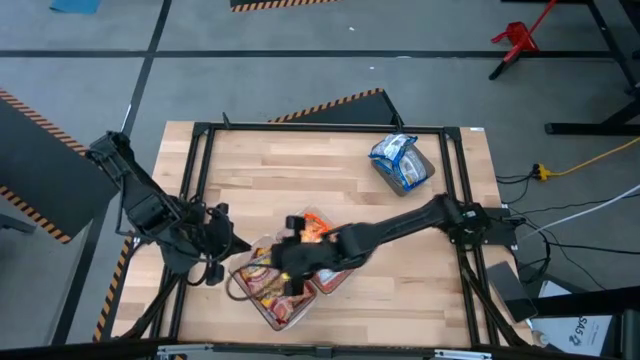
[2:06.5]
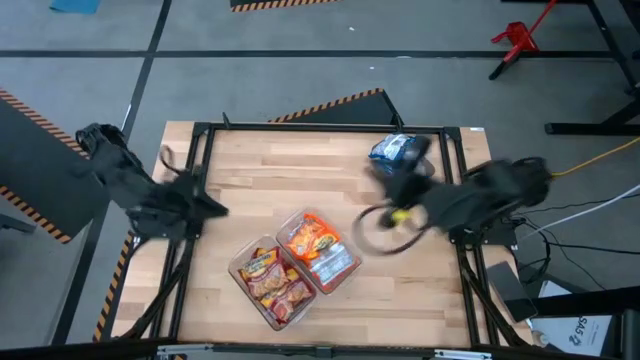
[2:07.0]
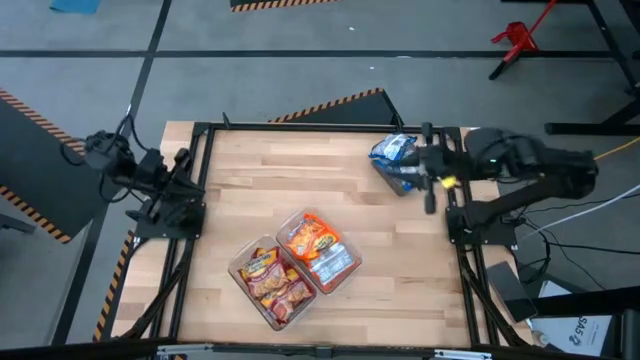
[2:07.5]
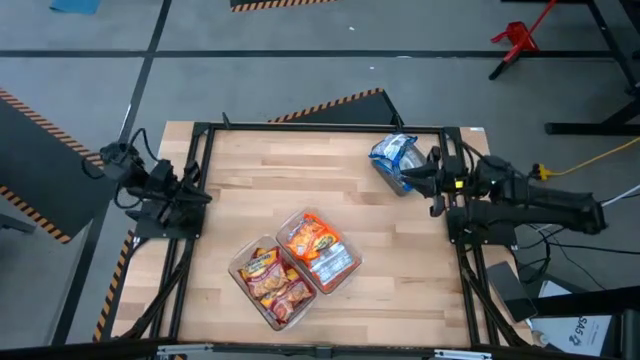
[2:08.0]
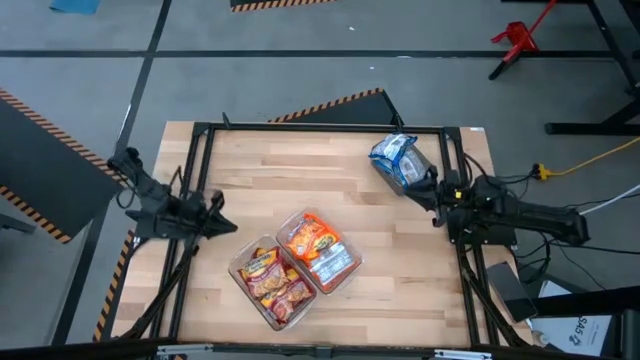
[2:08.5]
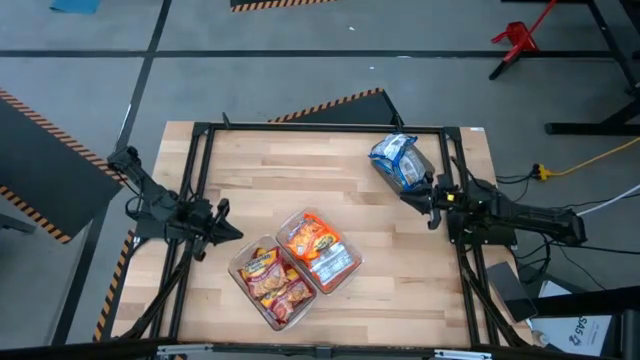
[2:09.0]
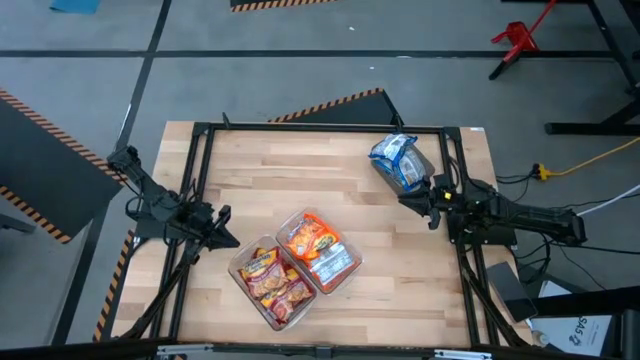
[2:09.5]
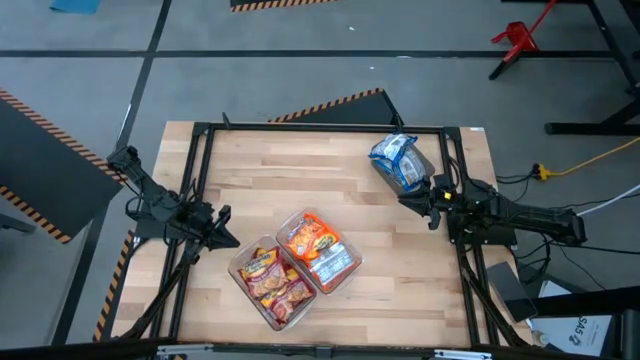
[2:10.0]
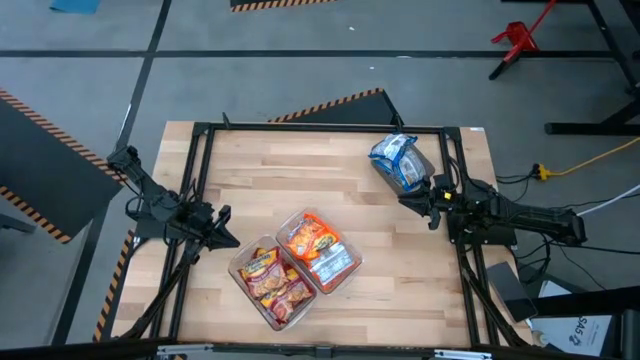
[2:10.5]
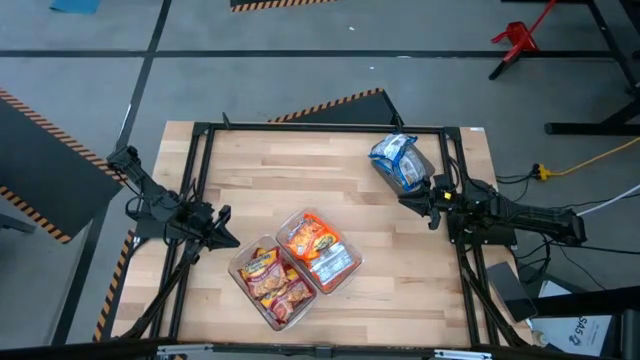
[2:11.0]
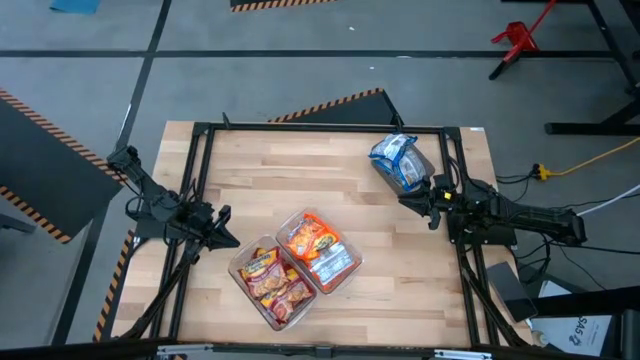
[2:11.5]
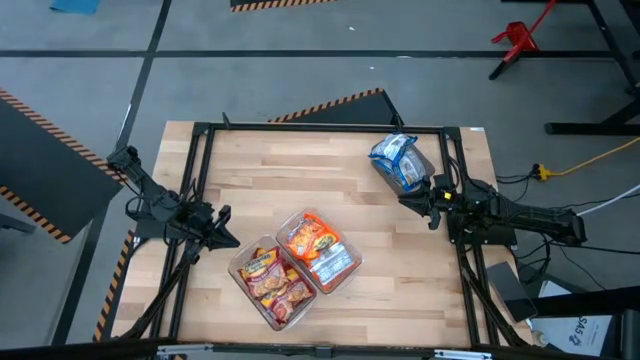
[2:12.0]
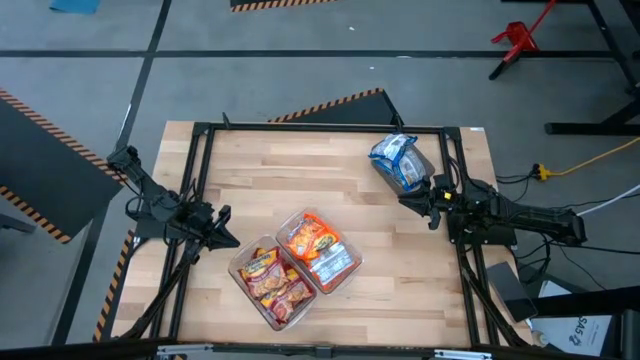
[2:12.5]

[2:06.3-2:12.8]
Task: Sort Maruchan noodles
Return to Home Position

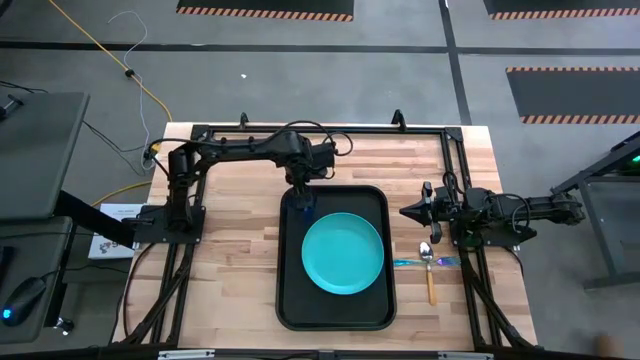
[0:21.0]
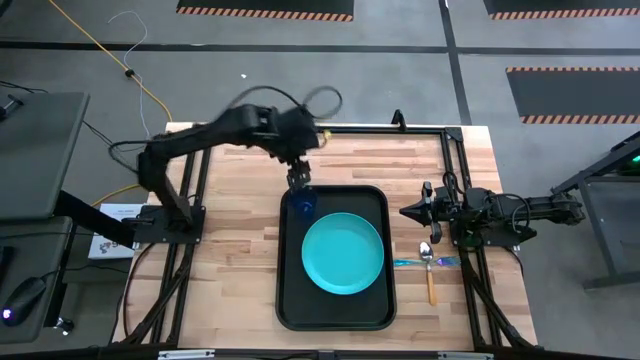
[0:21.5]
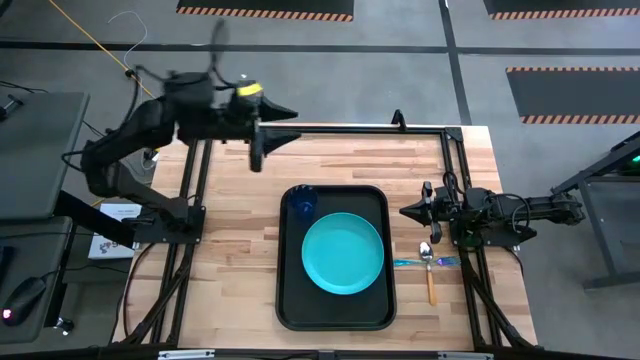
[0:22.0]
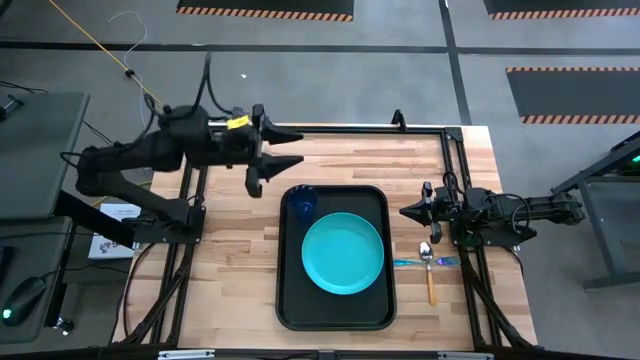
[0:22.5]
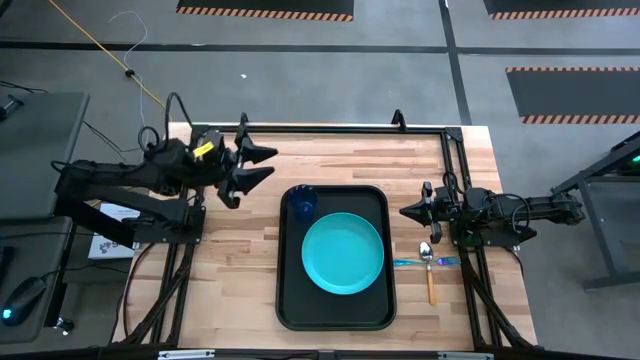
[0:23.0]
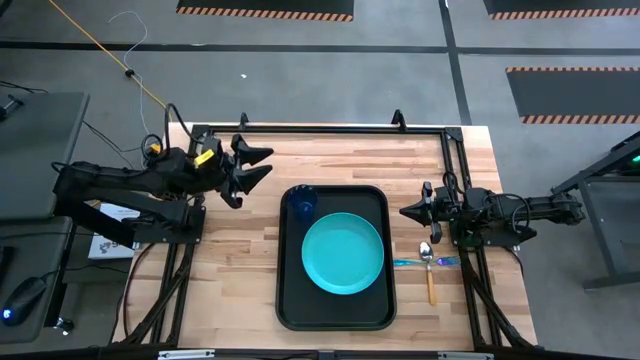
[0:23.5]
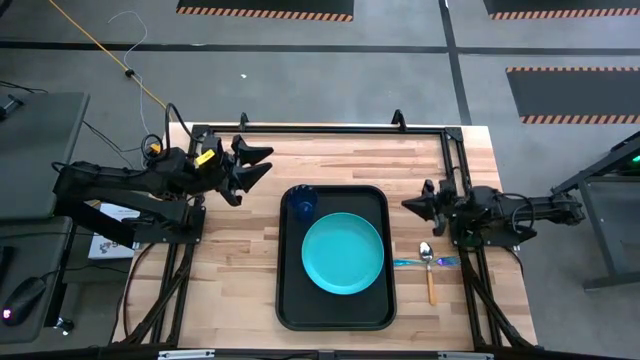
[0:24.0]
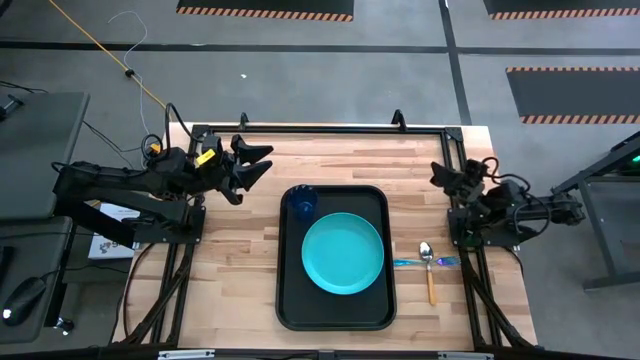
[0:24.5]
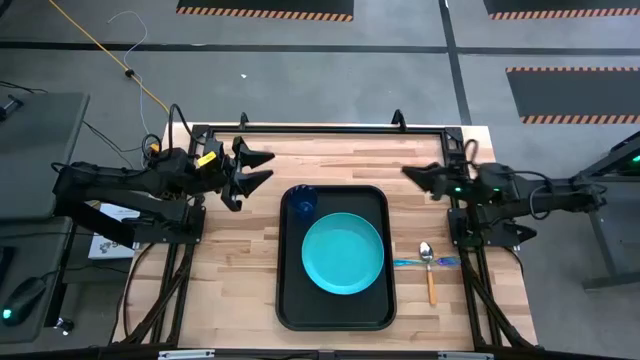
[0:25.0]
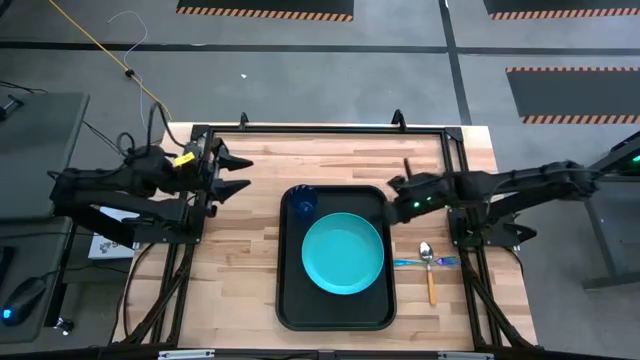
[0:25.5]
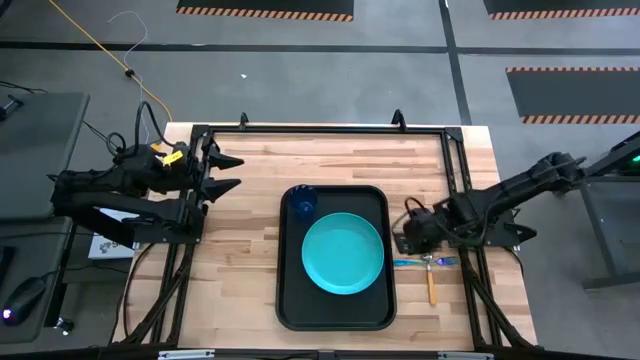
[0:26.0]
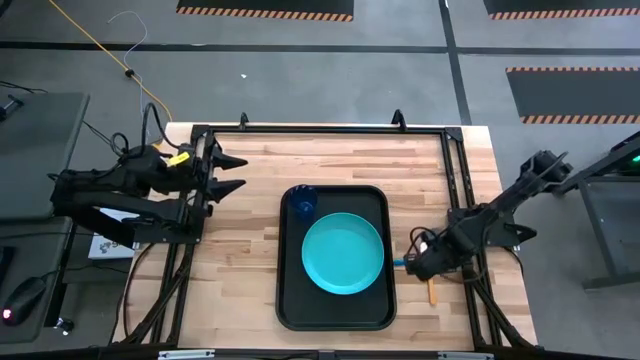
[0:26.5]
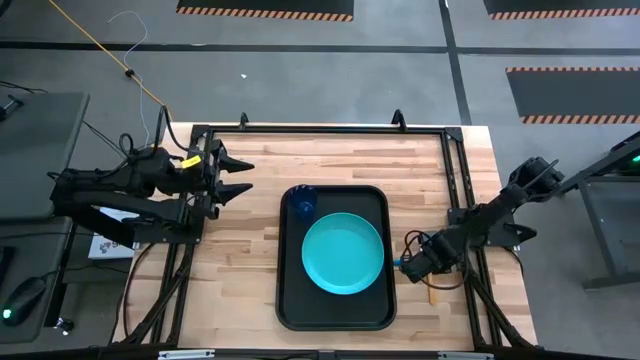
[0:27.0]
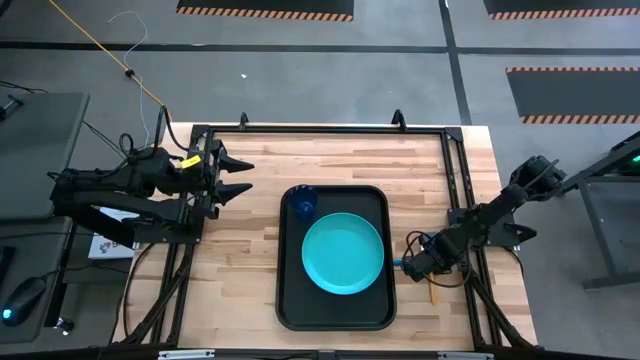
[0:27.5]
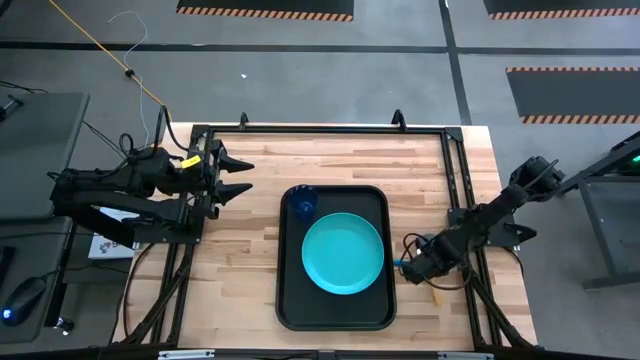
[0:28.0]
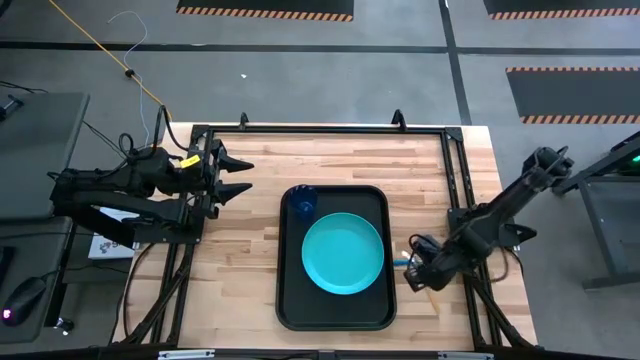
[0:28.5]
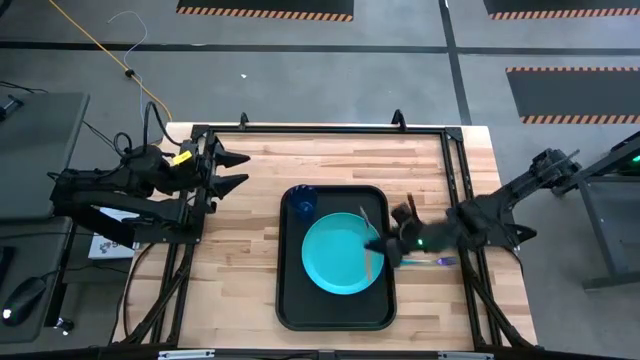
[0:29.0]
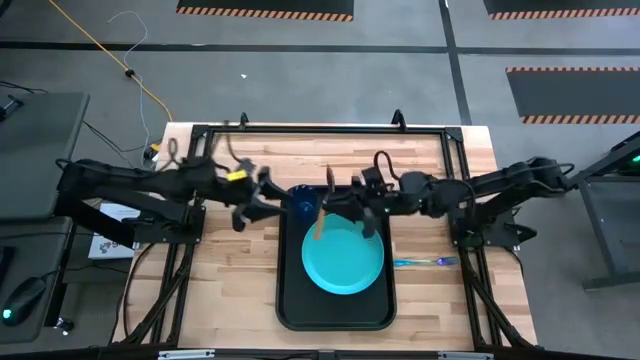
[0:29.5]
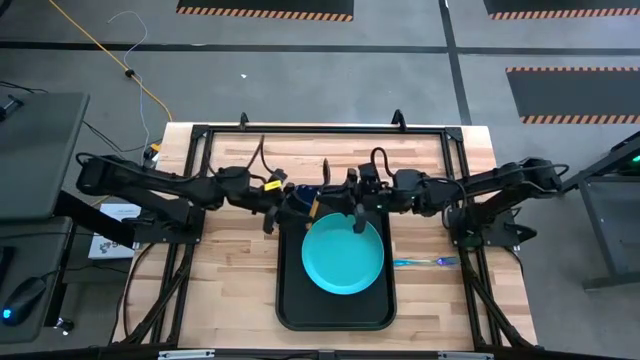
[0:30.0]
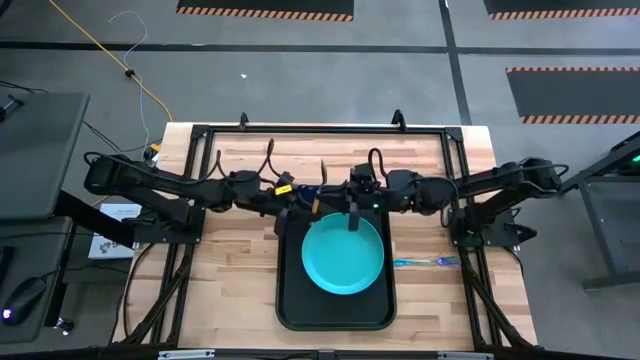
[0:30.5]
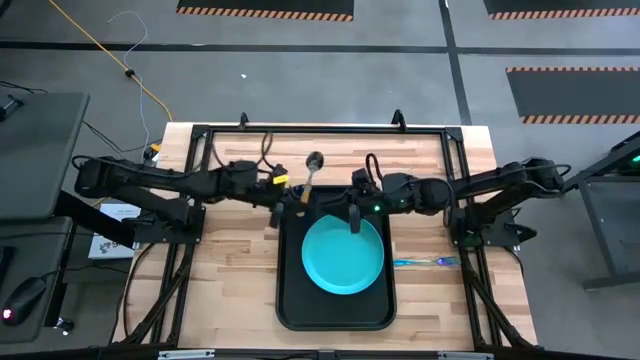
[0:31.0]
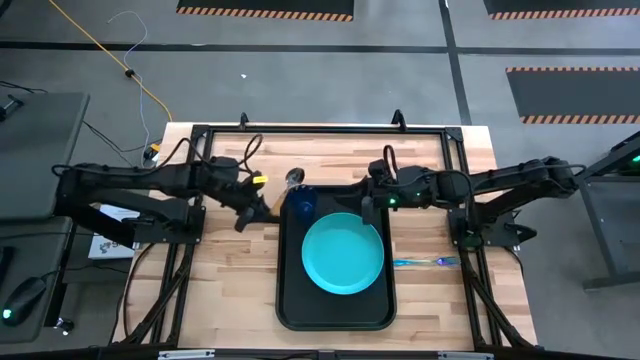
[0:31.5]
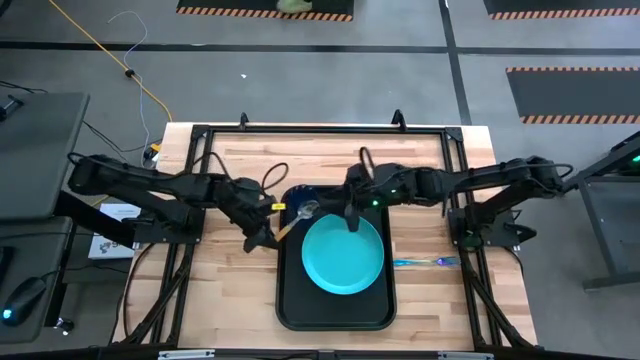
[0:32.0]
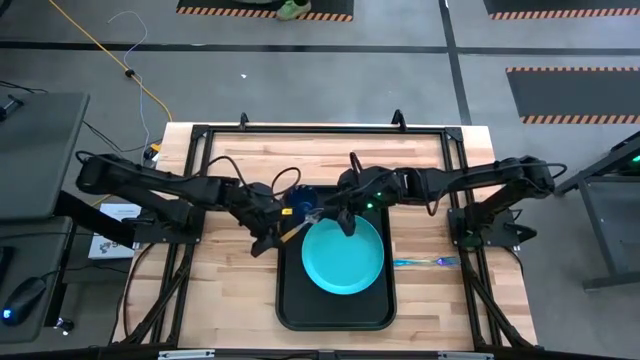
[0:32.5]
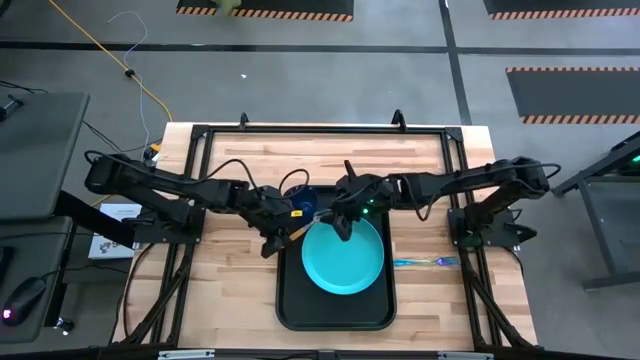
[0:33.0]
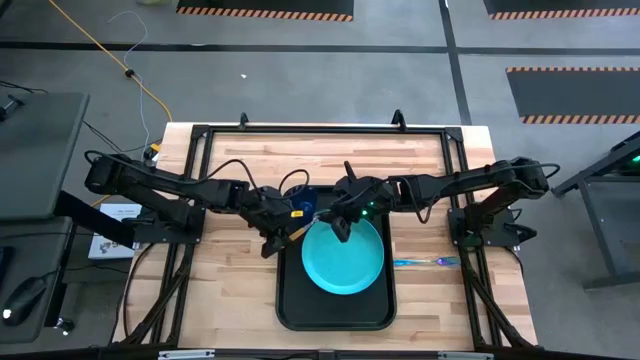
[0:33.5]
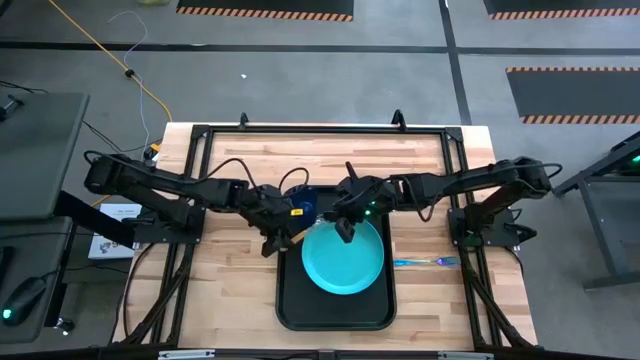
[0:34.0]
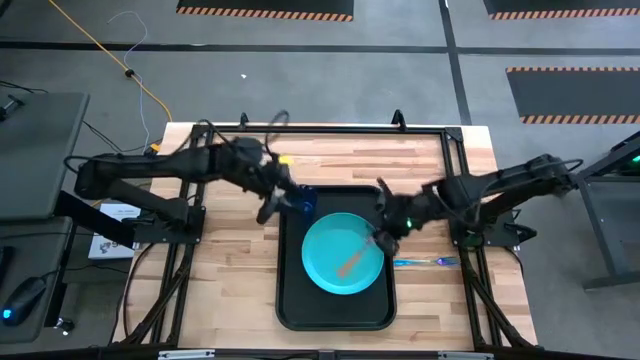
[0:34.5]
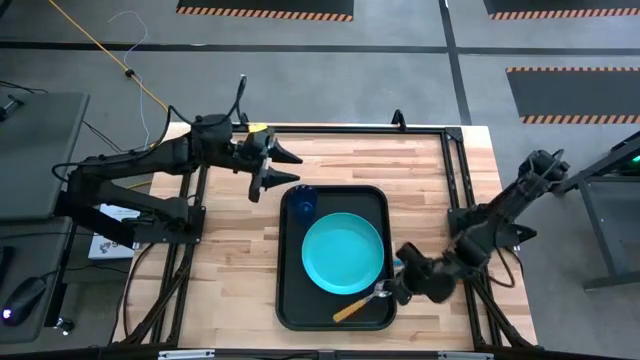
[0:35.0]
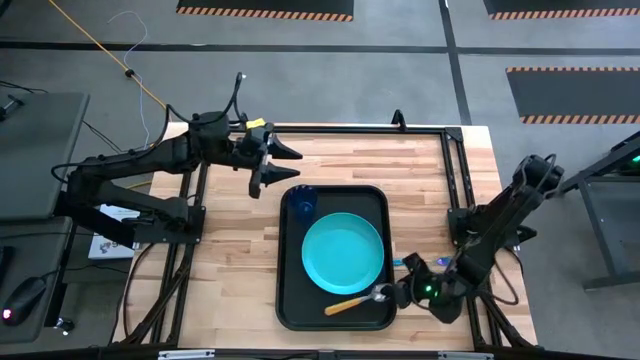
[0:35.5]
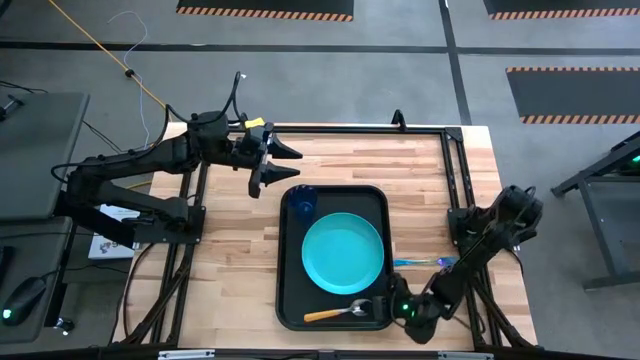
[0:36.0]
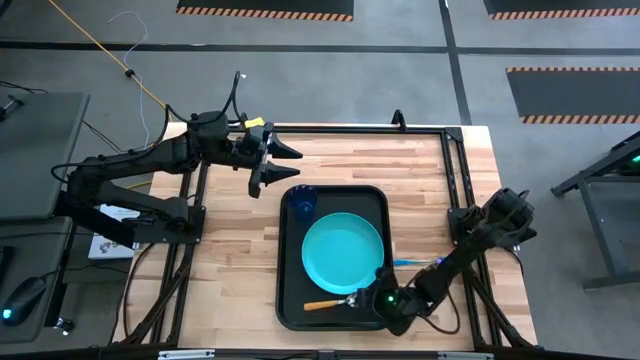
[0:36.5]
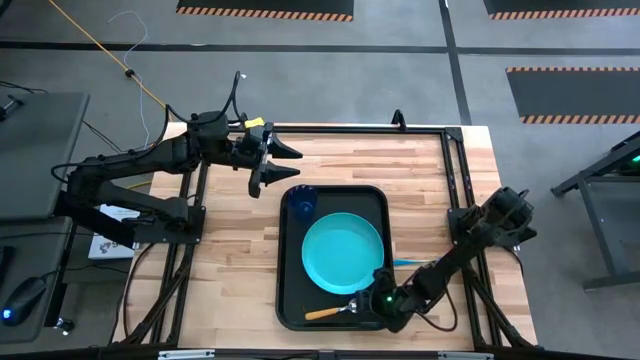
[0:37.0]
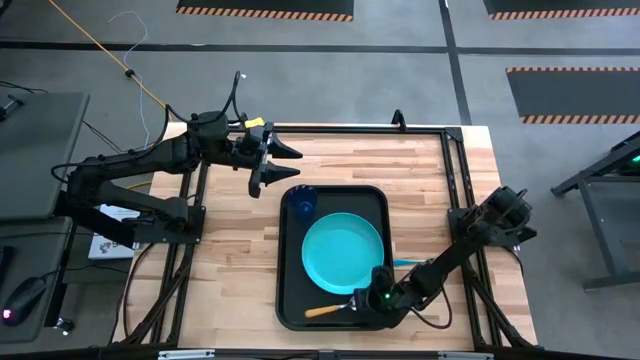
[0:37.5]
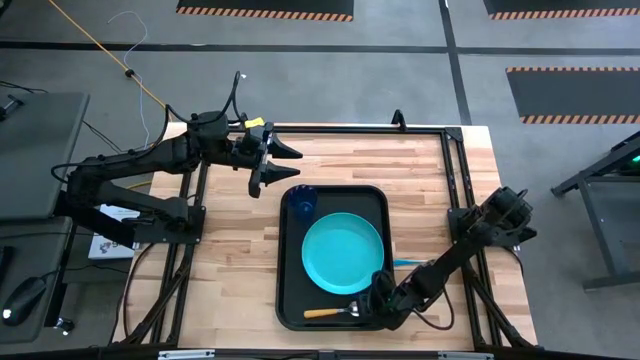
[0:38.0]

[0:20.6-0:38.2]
Task: Pick and place plate/cup/fork/spoon on tray
Put the yellow spoon in the black tray into the bottom of the blue plate
